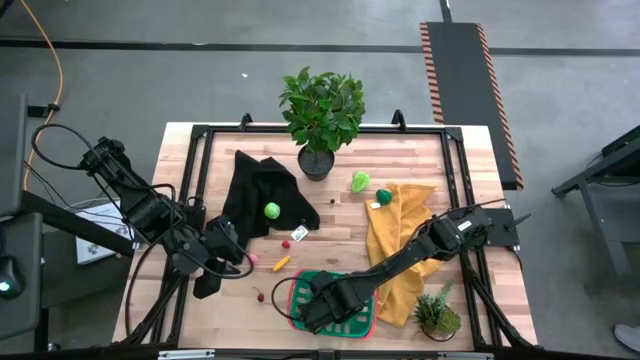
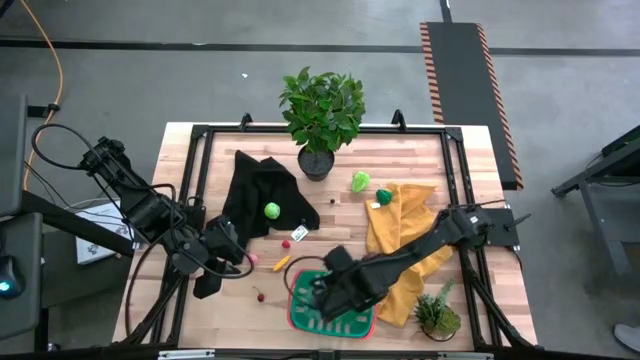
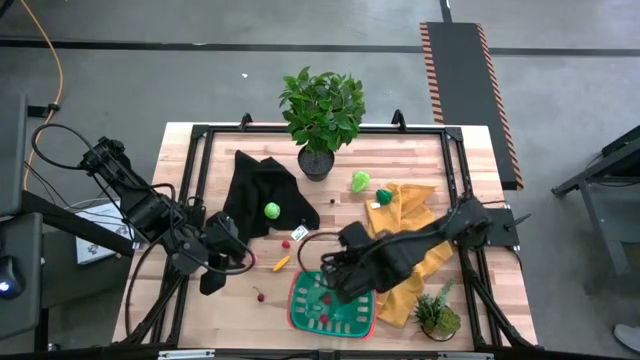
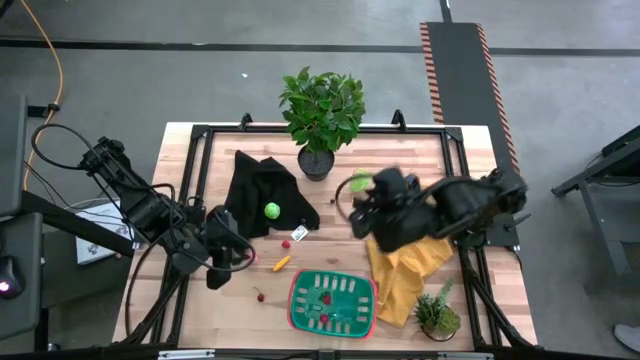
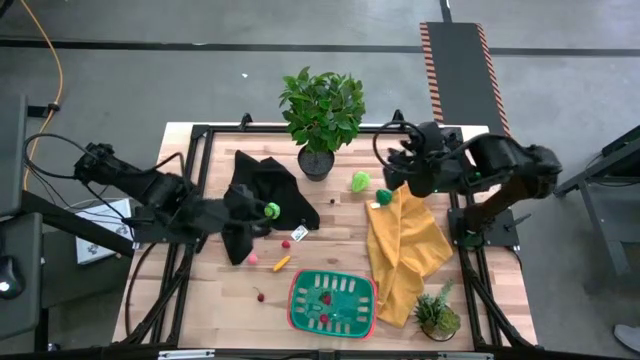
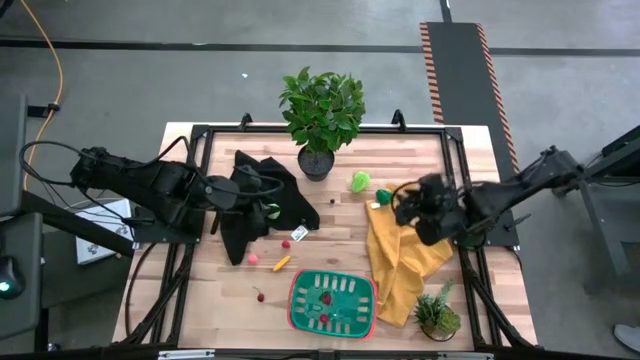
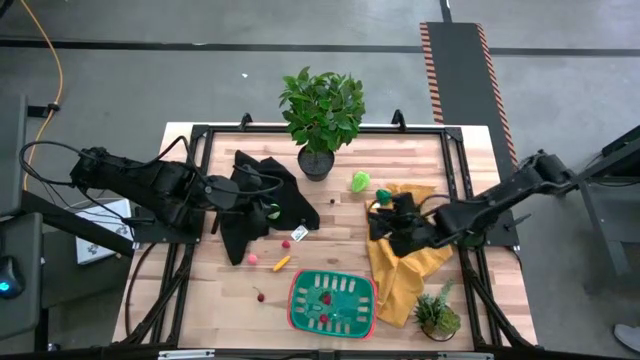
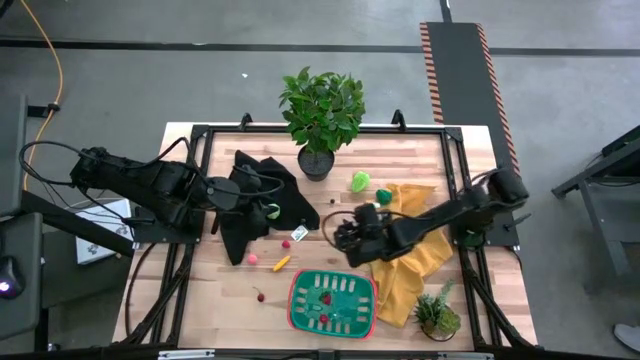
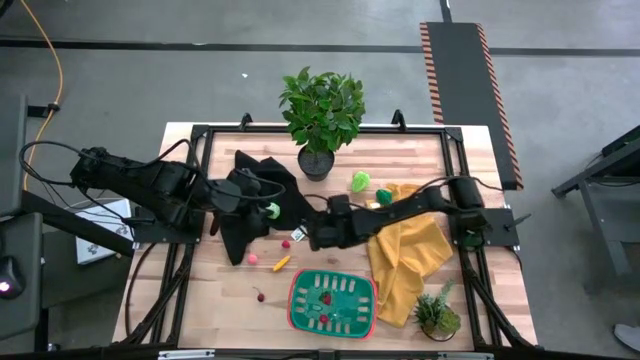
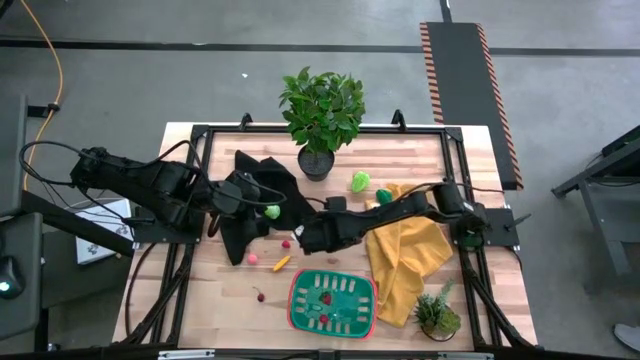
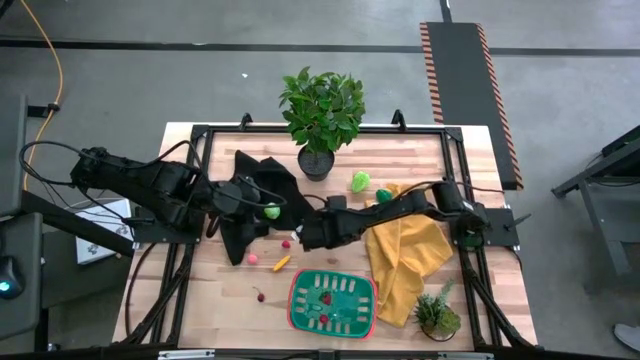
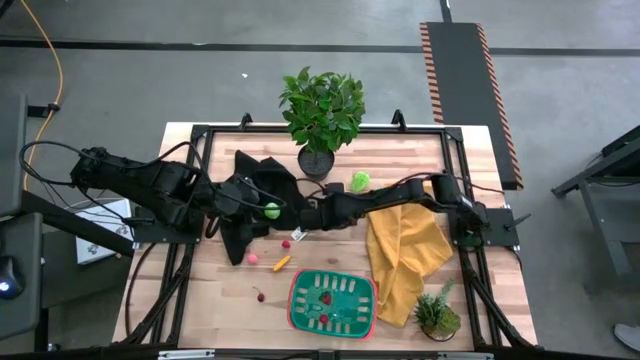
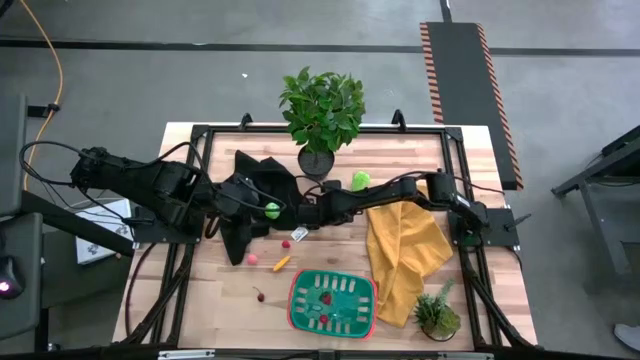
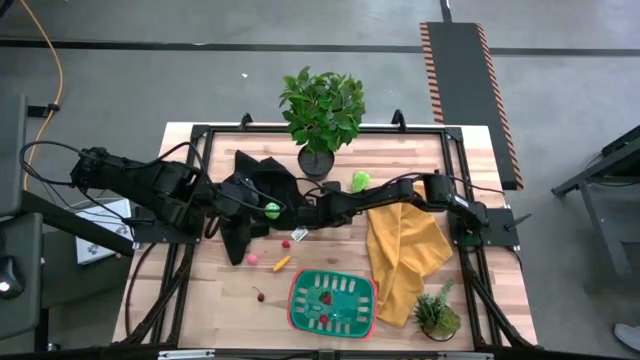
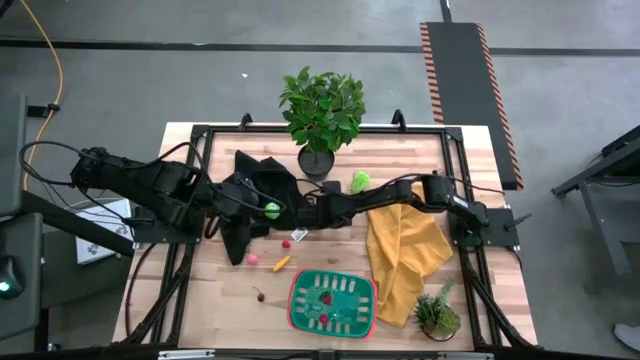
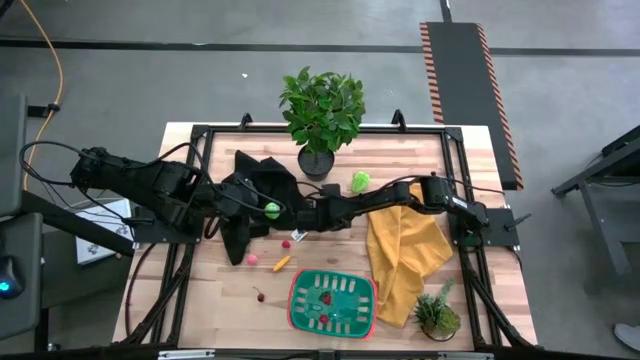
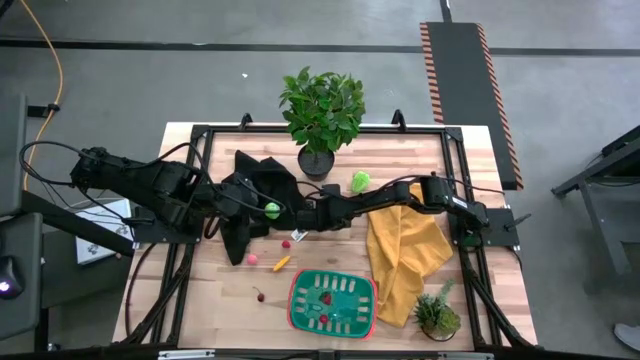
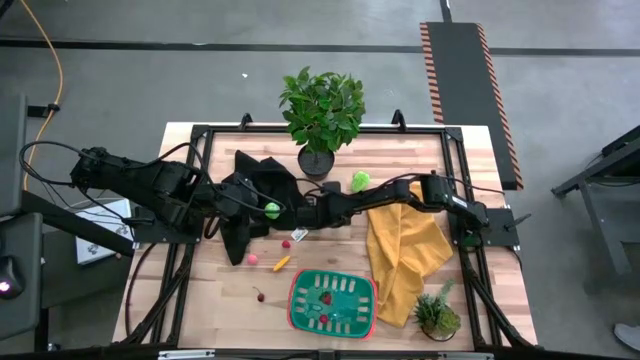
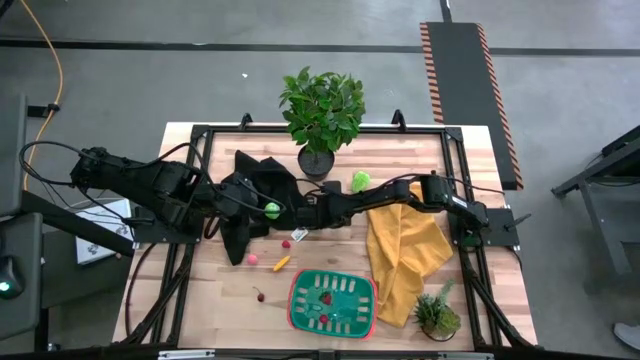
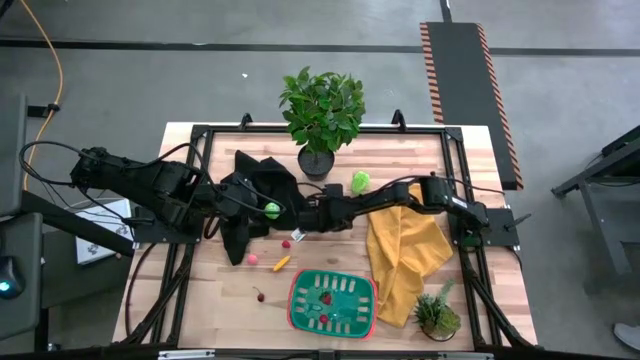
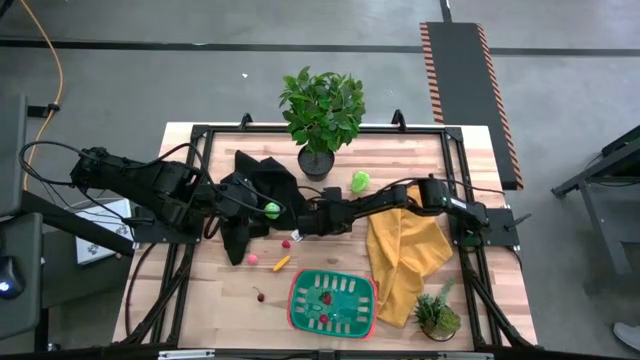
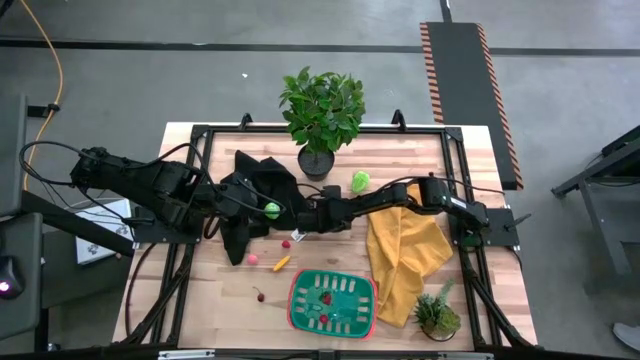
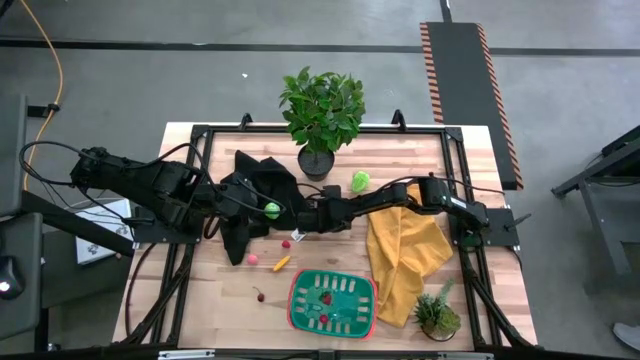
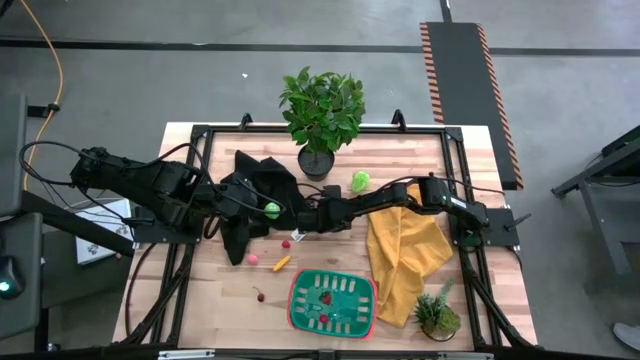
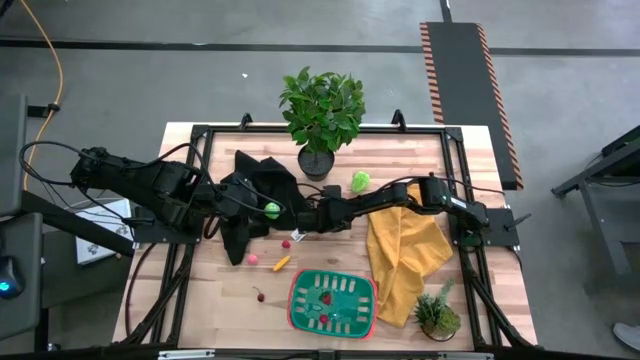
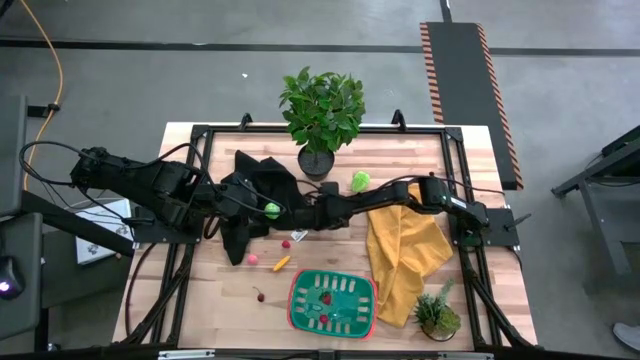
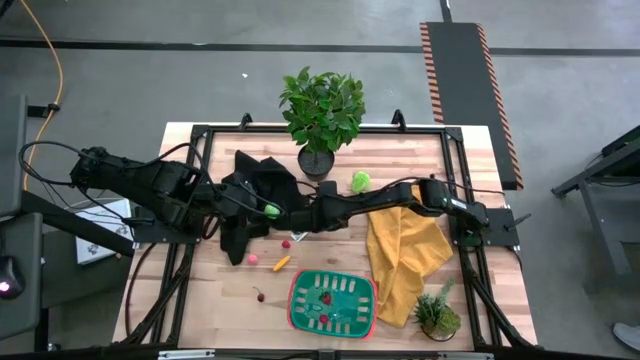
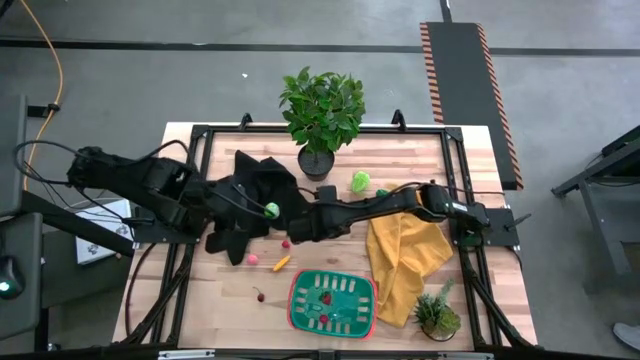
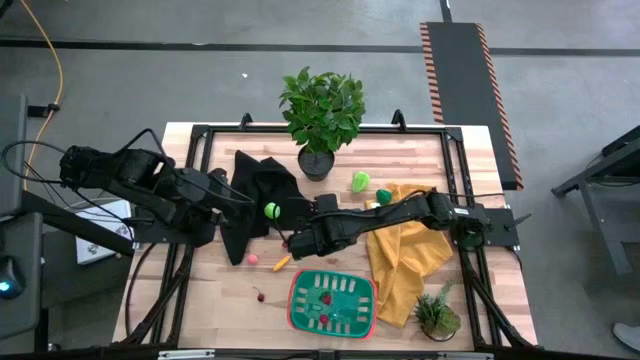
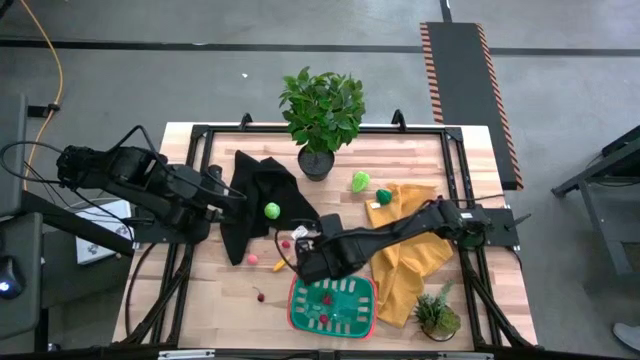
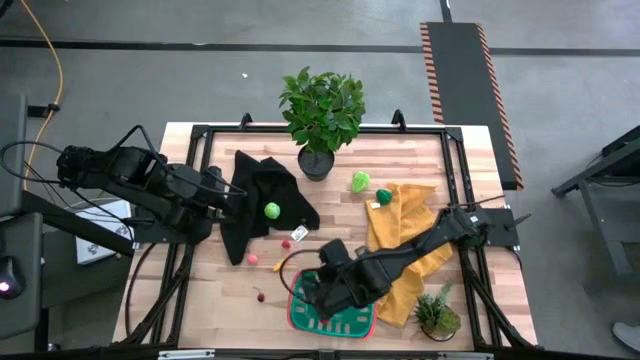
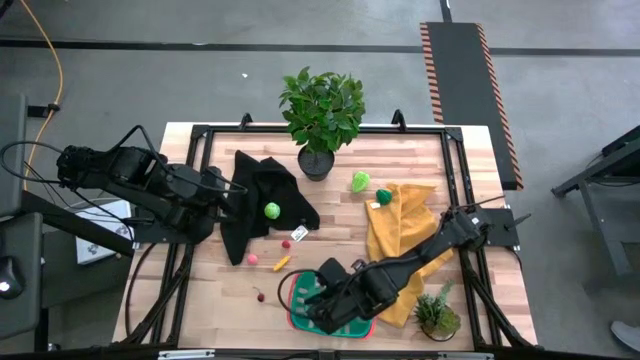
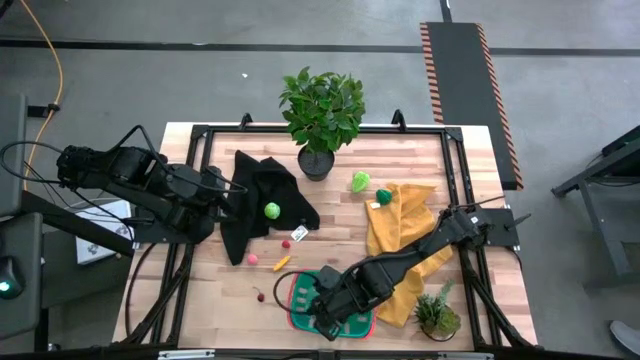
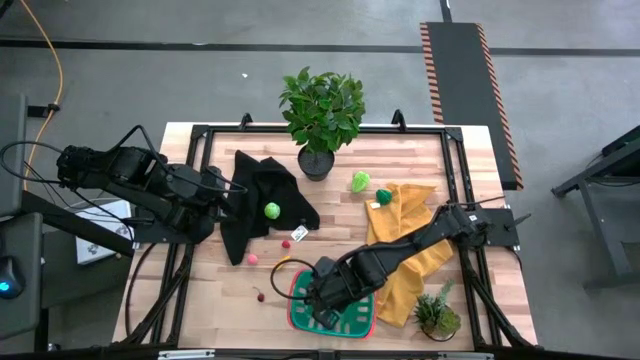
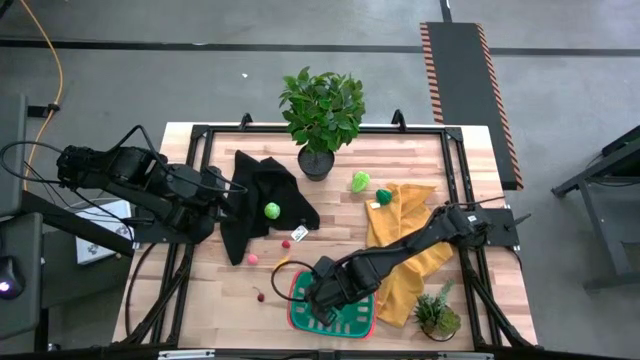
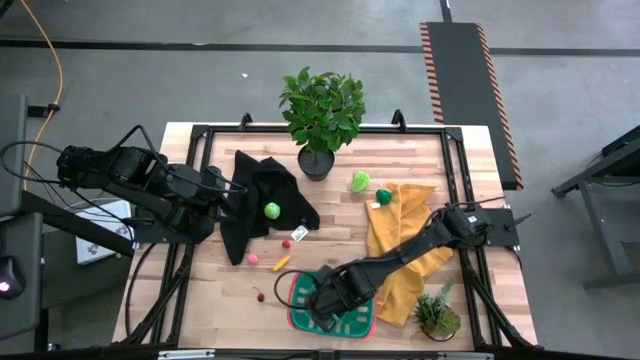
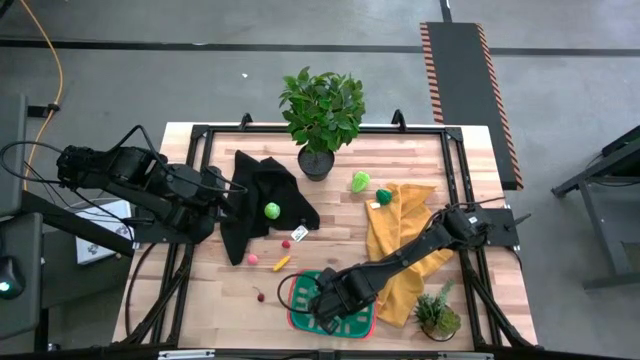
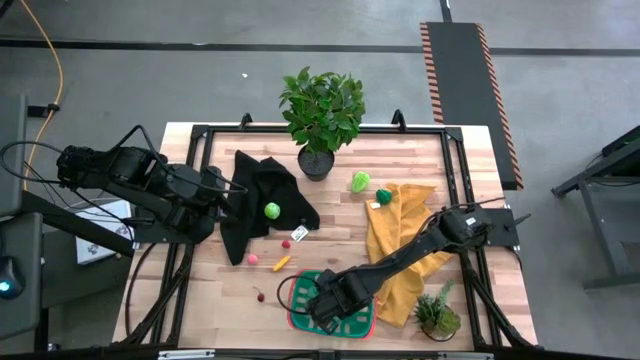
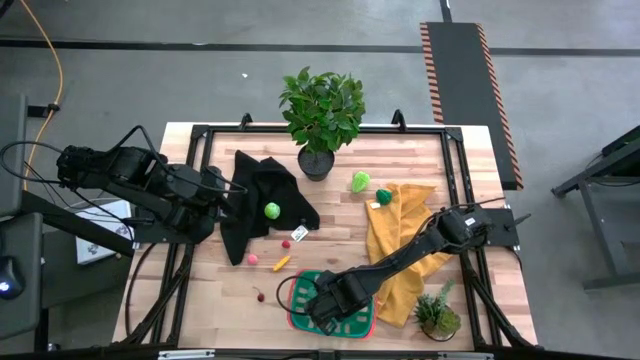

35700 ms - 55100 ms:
Task: Pick and placing Produce into tupperware
Put the blueberry into the blue bin

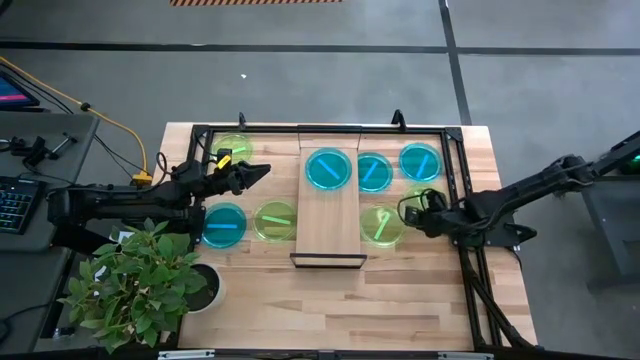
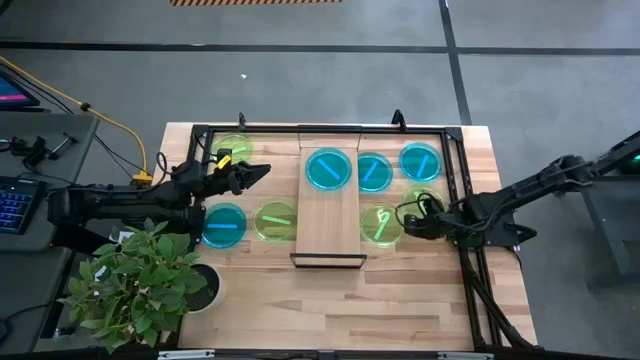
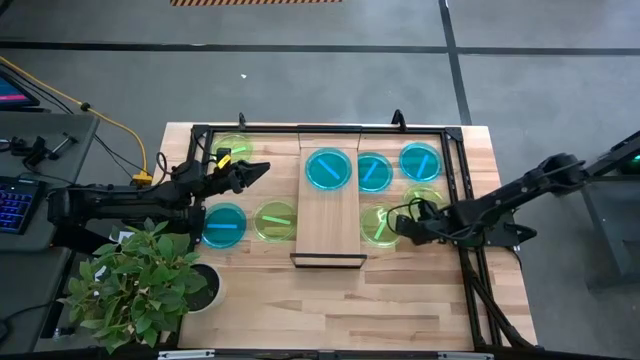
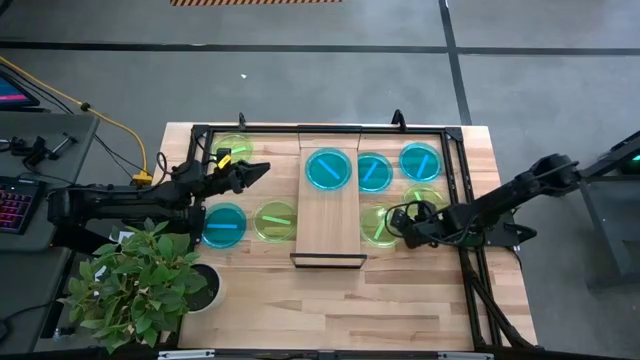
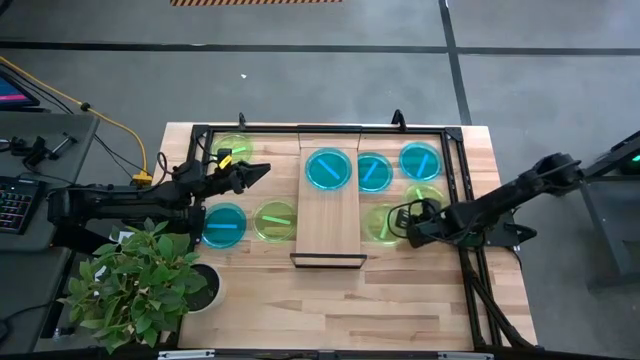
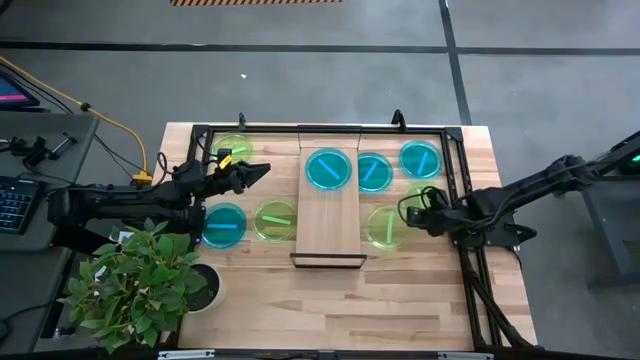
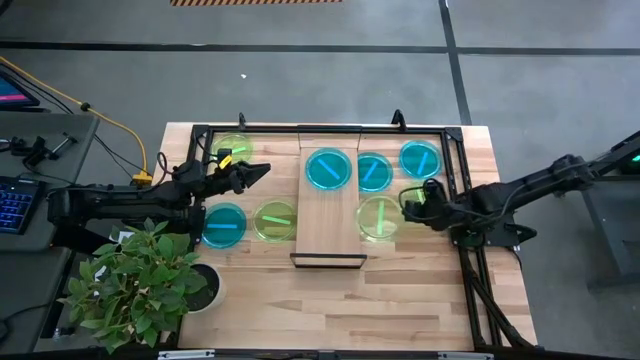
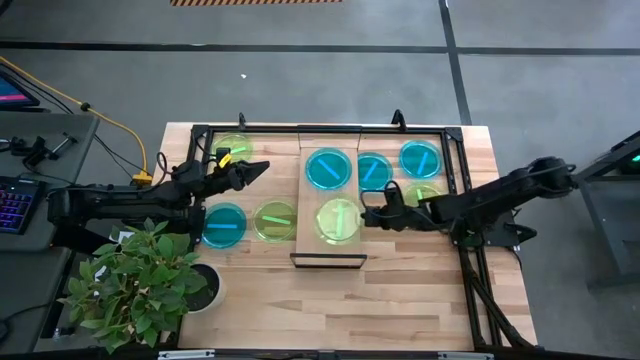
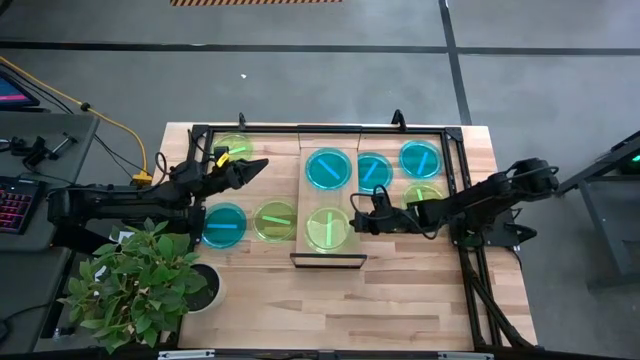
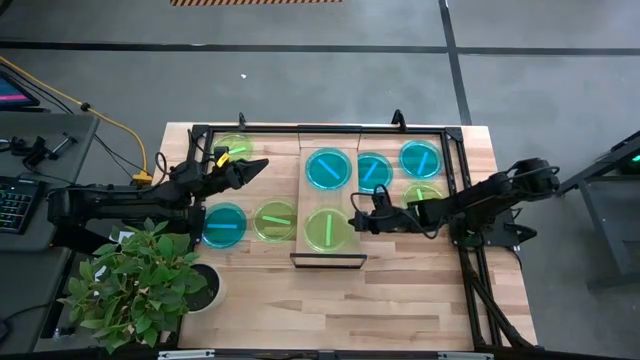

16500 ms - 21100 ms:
Task: Place and stack plates onto a shelf
Put the green plate on the shelf
